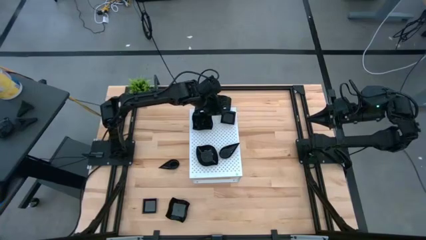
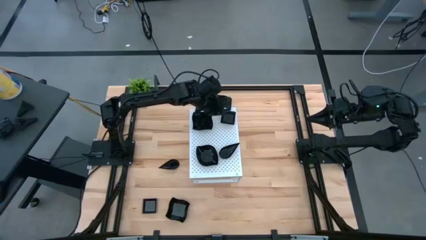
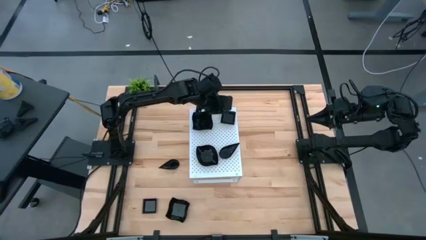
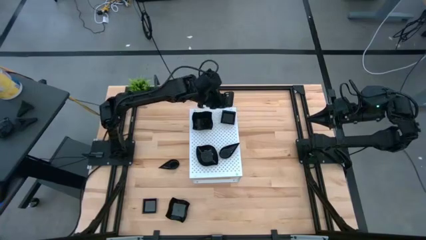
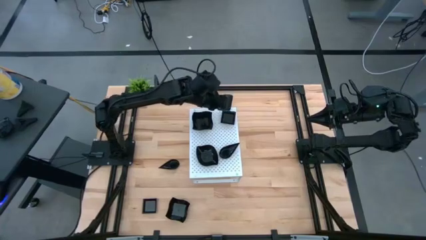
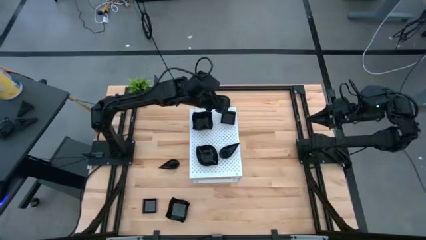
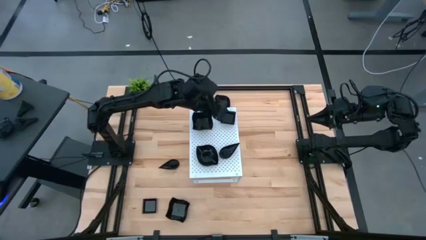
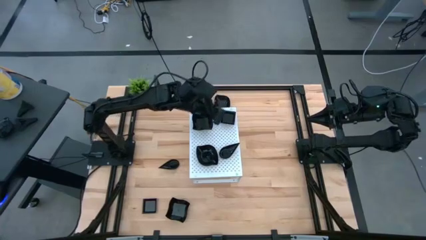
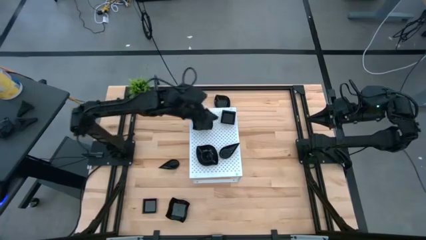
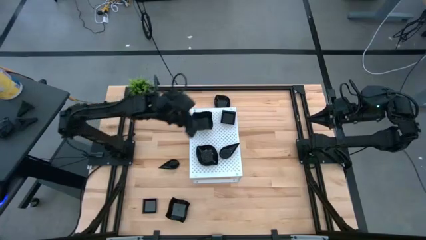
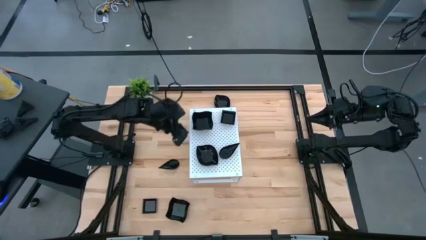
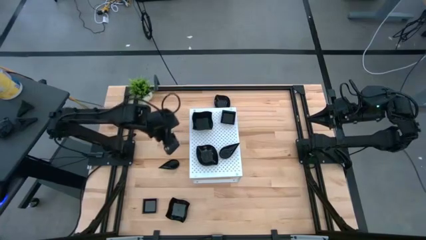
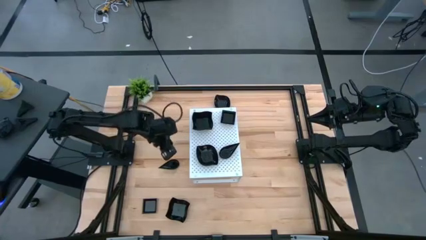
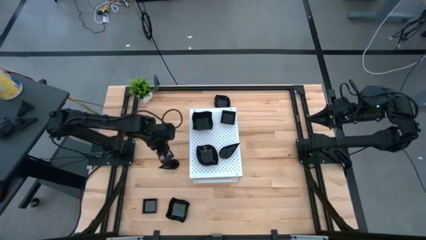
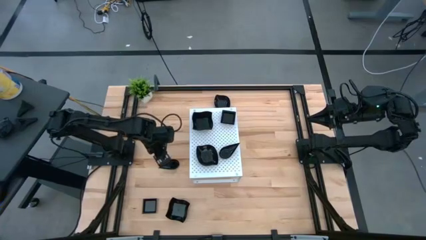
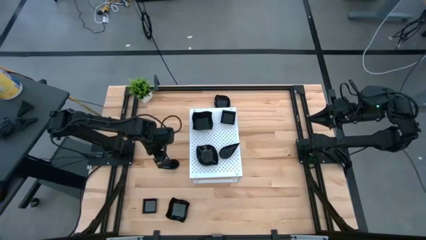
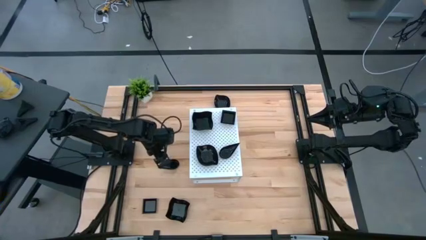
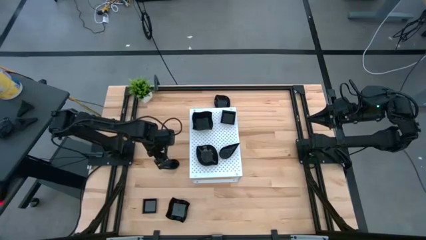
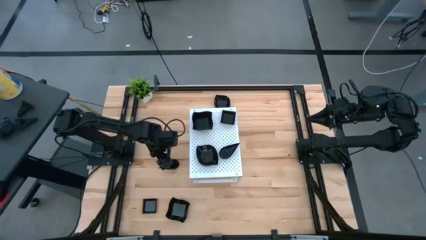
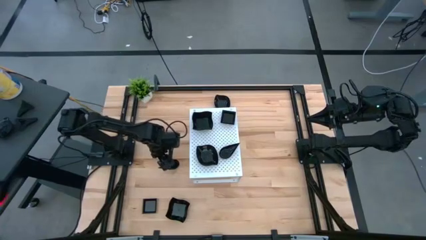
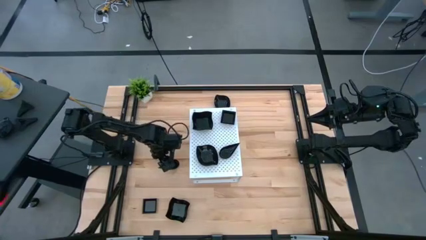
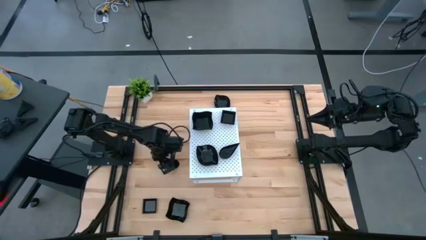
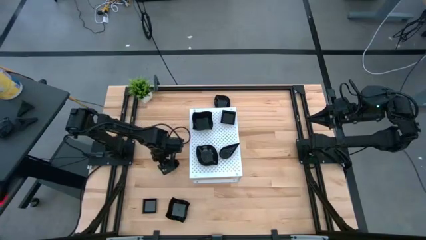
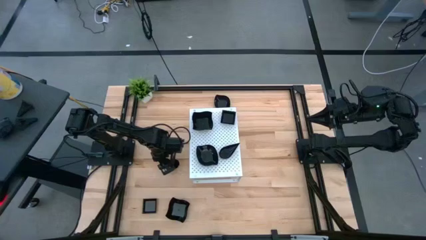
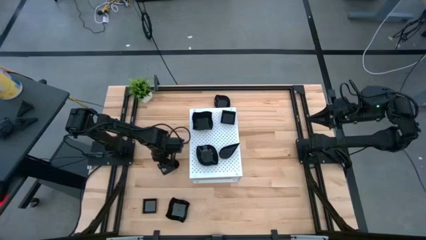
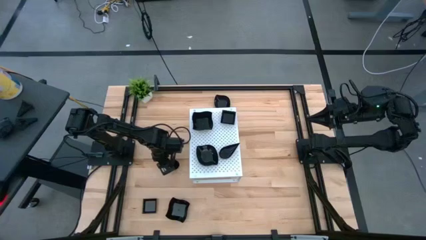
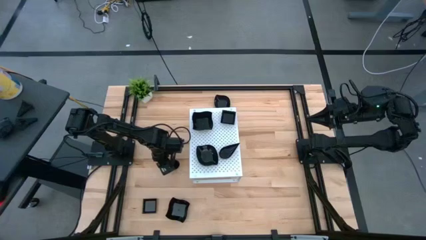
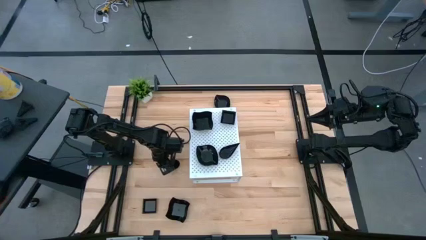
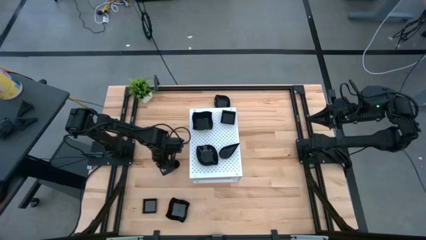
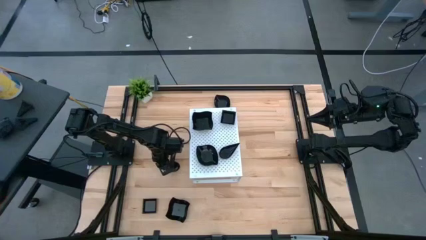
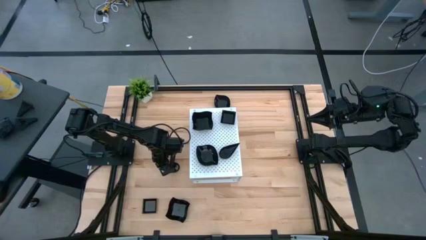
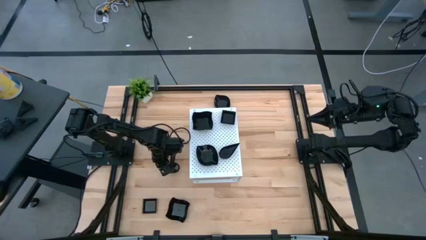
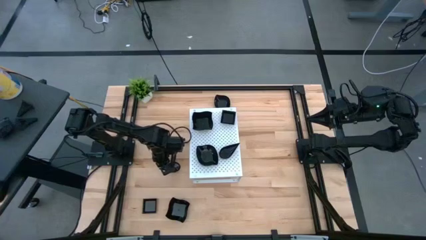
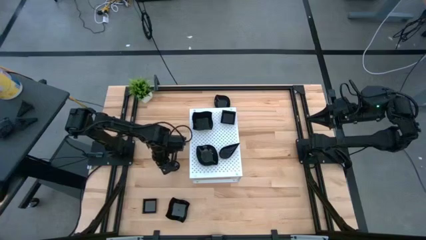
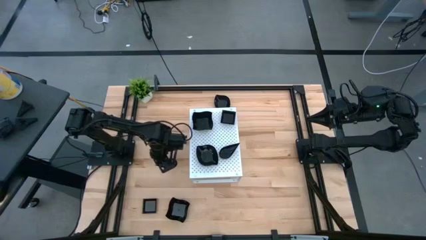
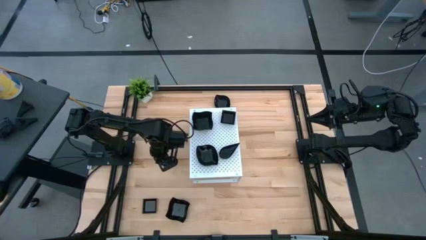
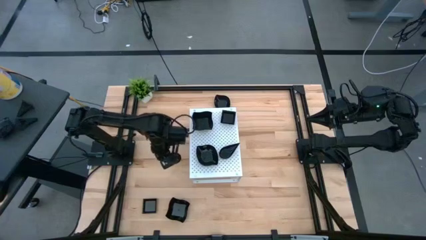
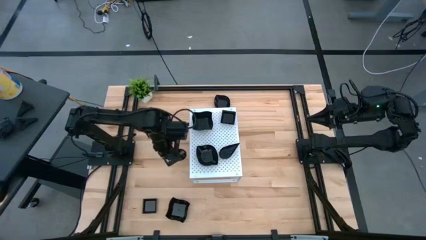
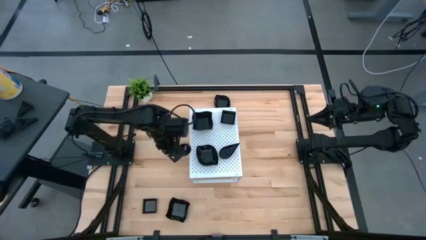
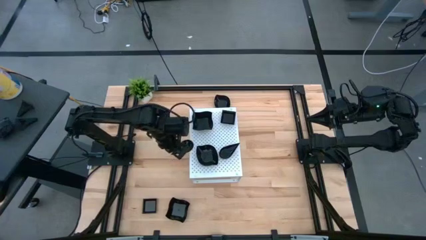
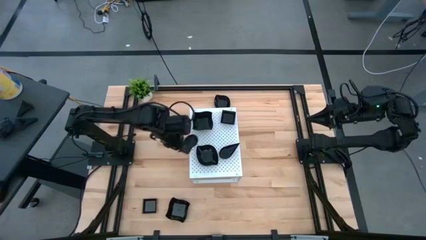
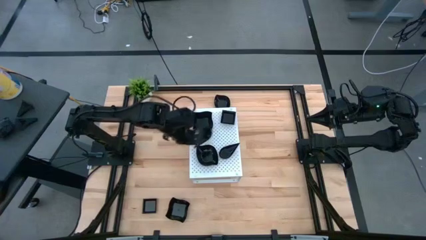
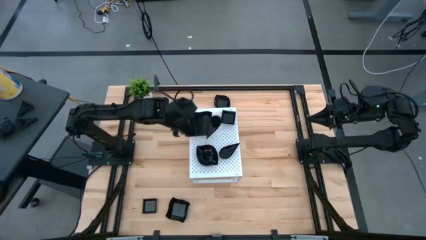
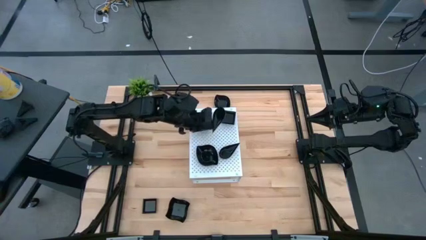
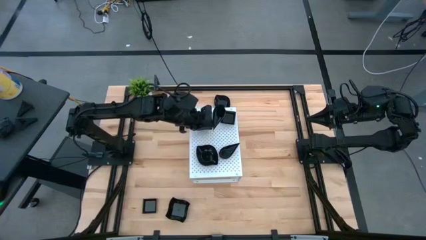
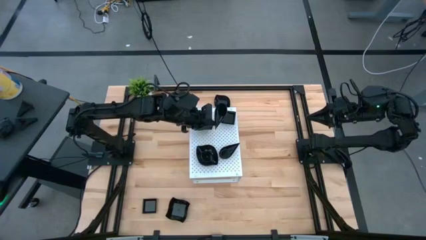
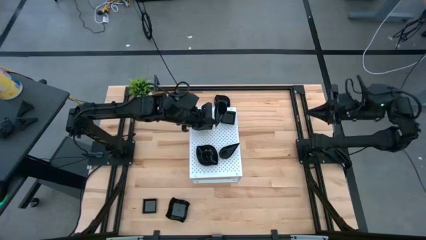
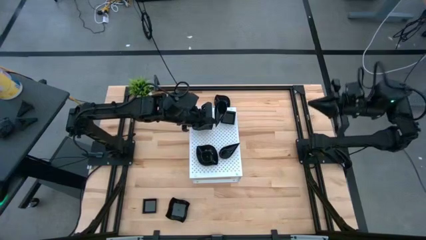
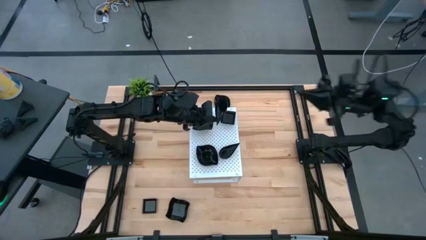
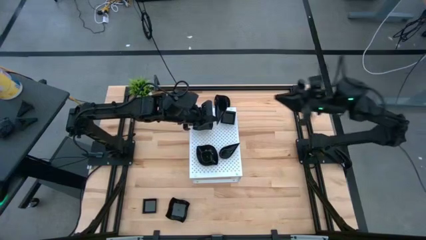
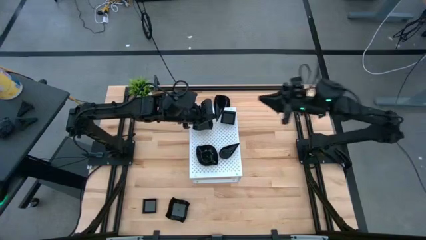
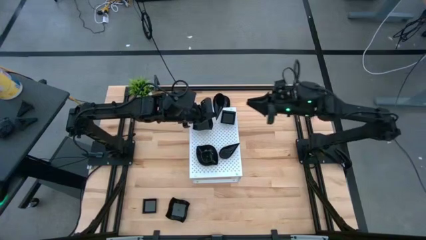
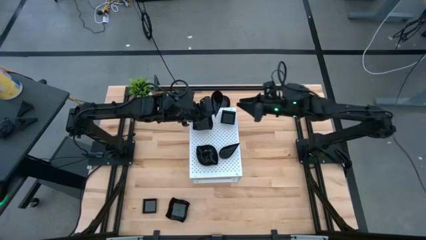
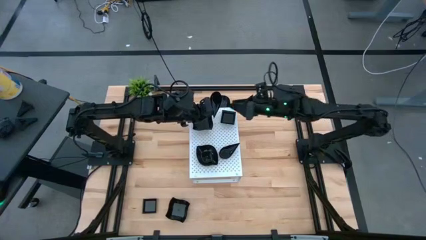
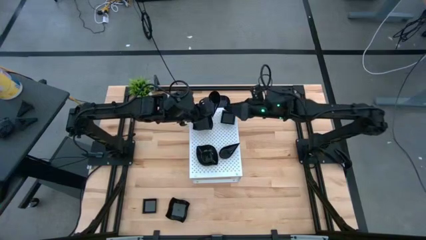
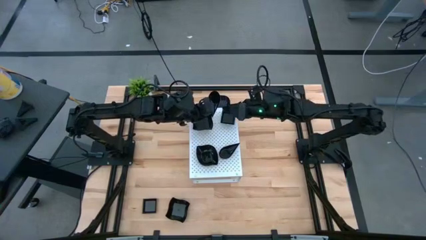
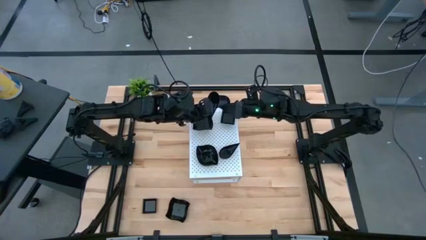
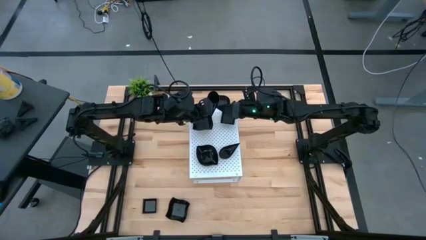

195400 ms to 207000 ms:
Task: Pick & Place Mini shaped plates
Stack the black drop shaped plate on top of the other black drop shaped plate on the shelf
